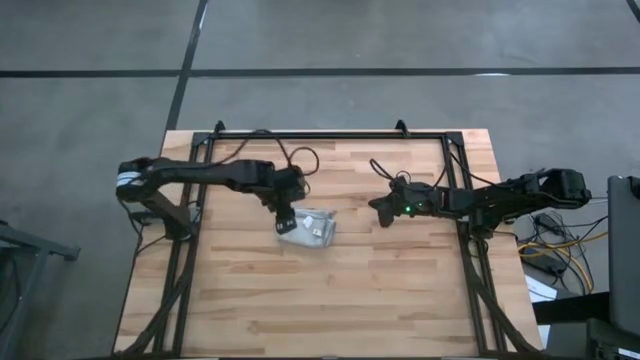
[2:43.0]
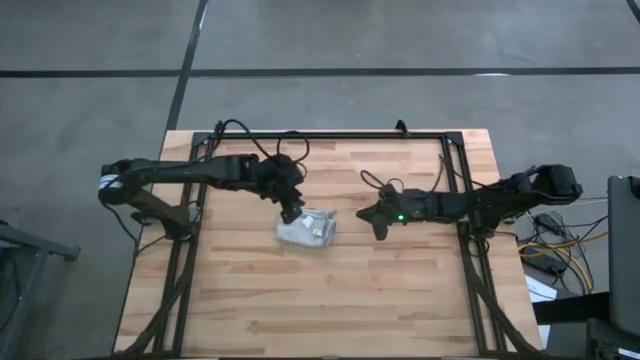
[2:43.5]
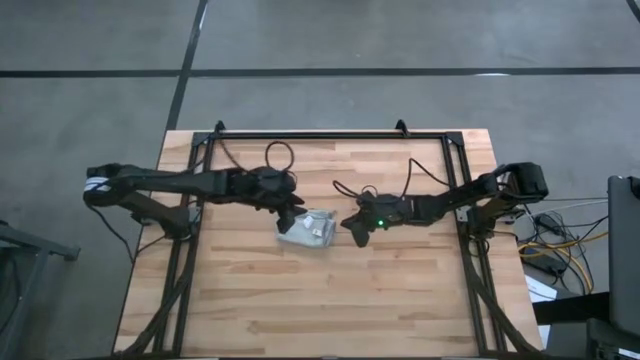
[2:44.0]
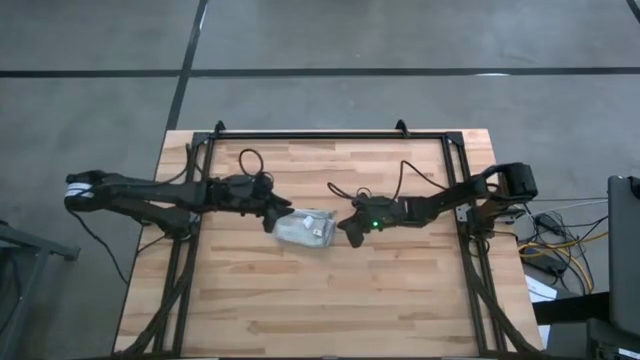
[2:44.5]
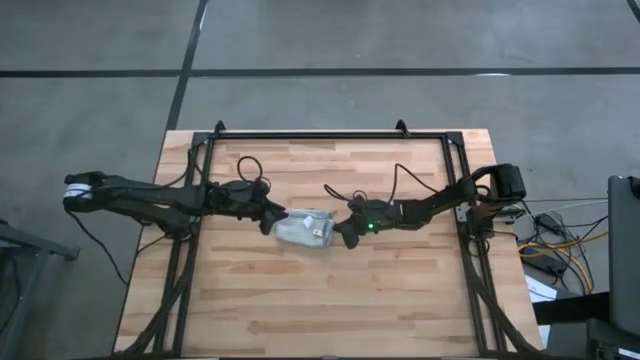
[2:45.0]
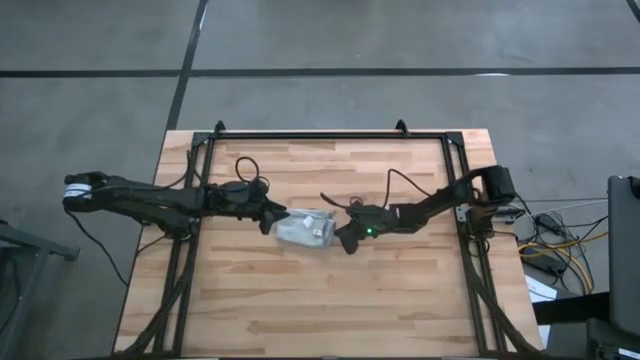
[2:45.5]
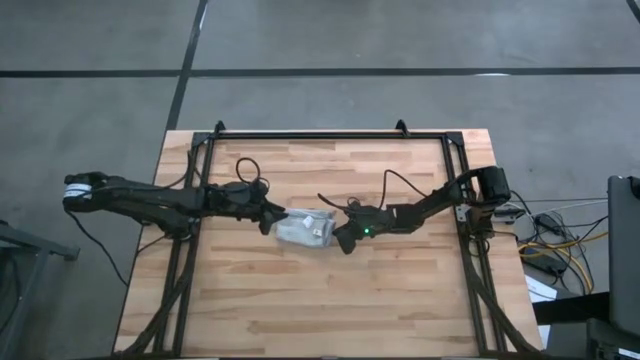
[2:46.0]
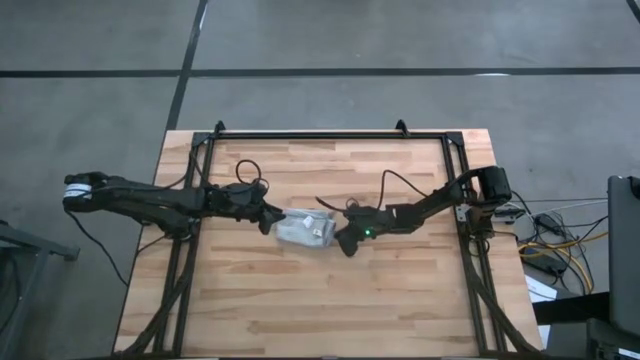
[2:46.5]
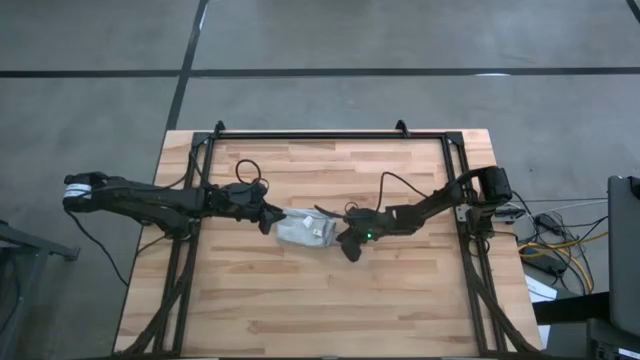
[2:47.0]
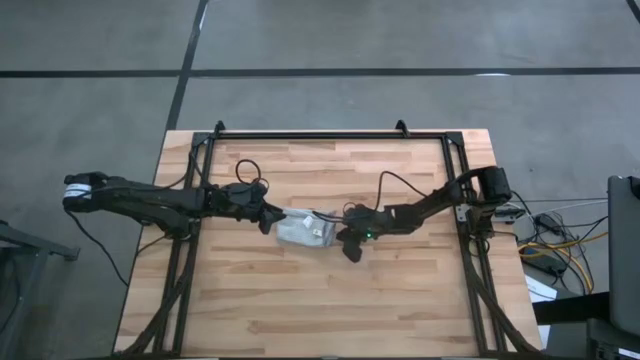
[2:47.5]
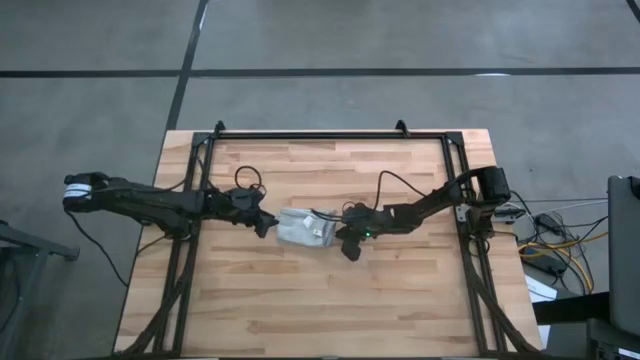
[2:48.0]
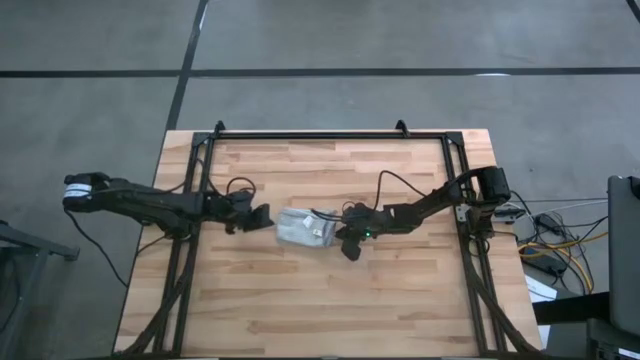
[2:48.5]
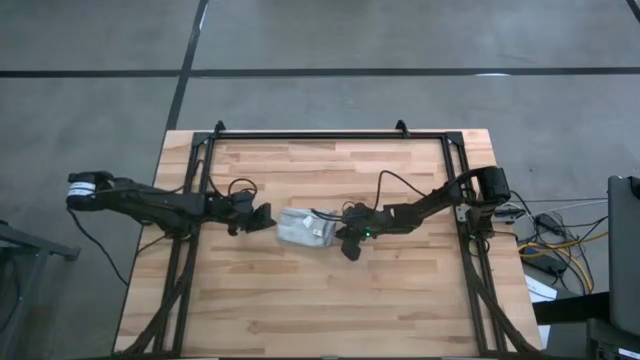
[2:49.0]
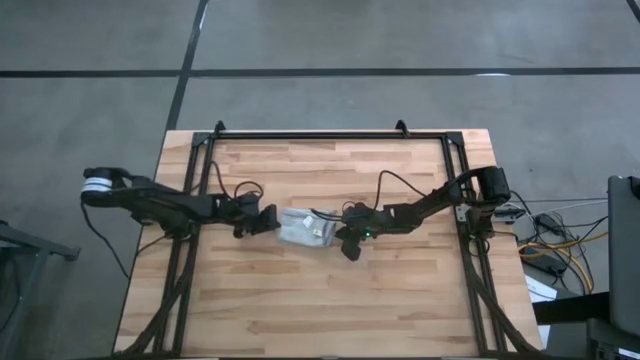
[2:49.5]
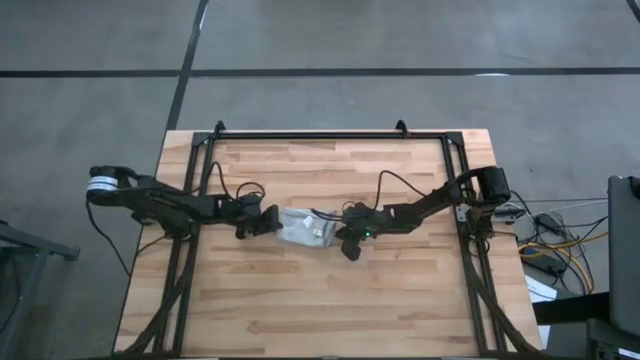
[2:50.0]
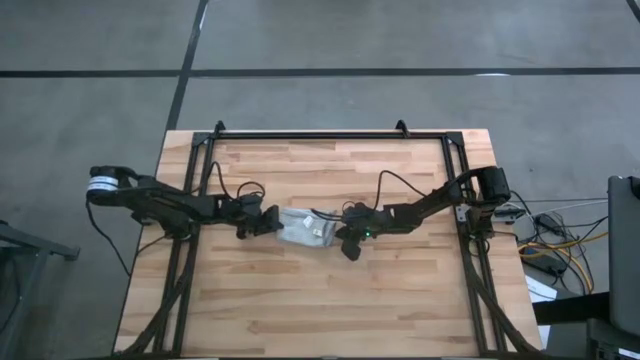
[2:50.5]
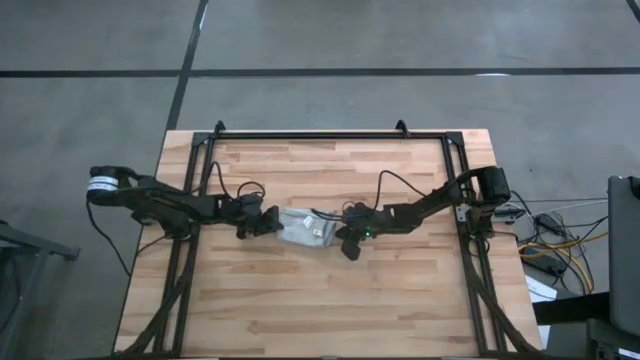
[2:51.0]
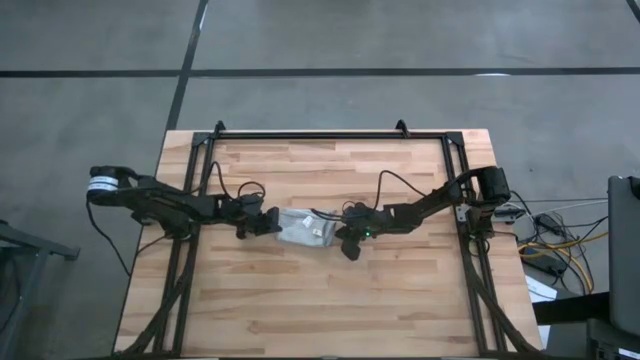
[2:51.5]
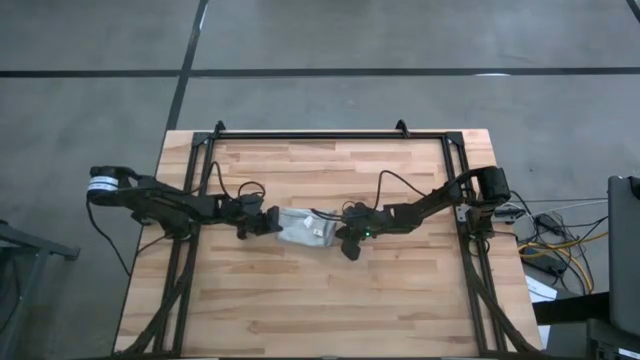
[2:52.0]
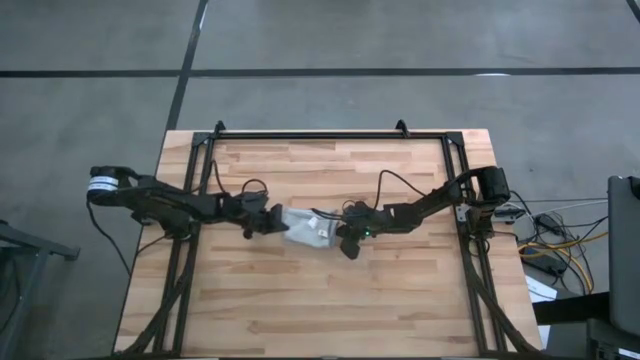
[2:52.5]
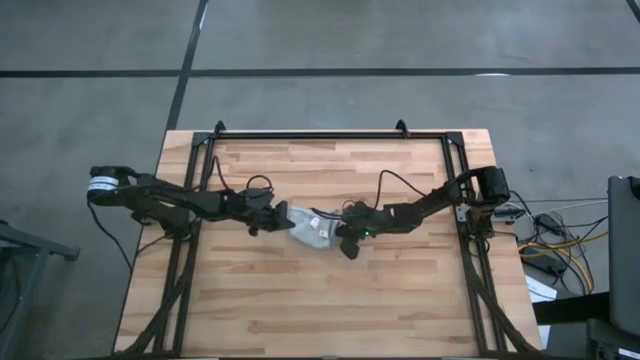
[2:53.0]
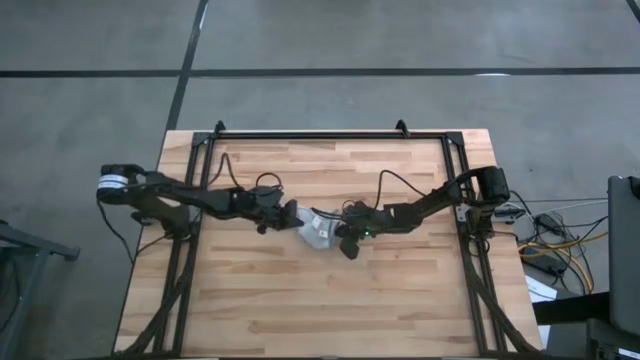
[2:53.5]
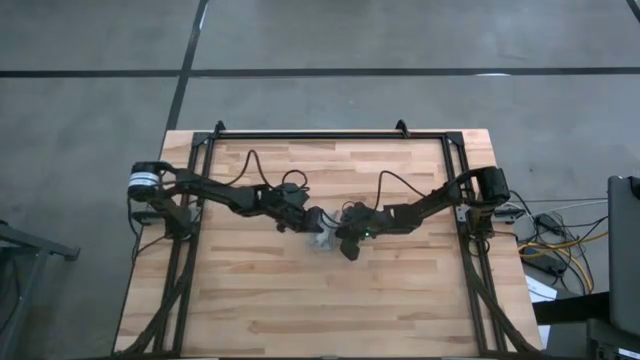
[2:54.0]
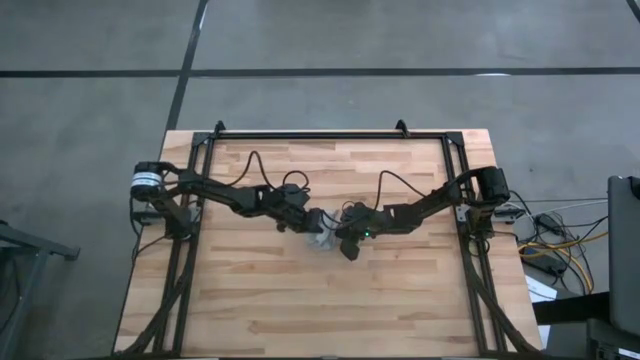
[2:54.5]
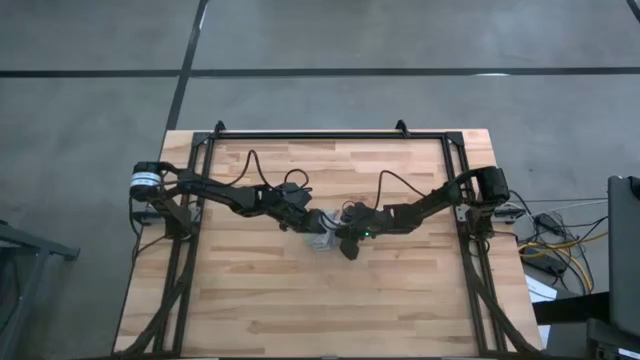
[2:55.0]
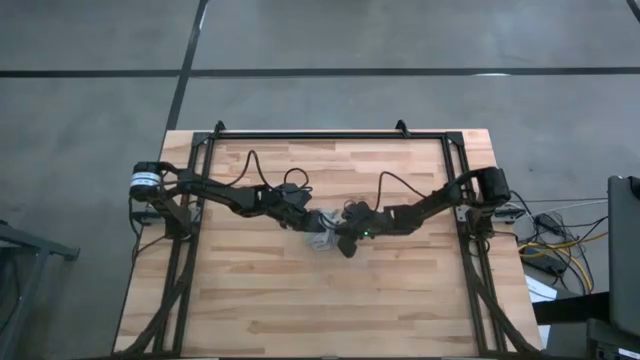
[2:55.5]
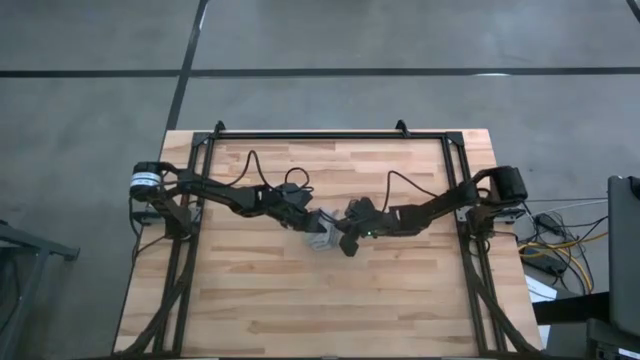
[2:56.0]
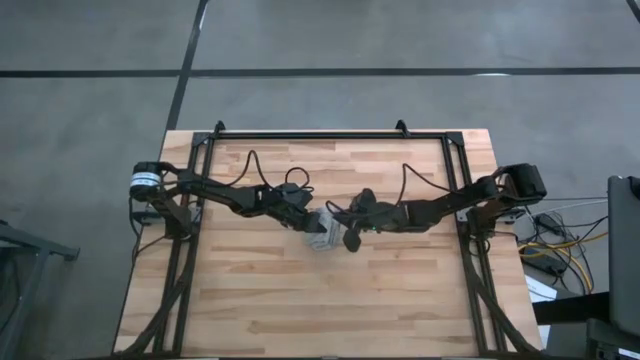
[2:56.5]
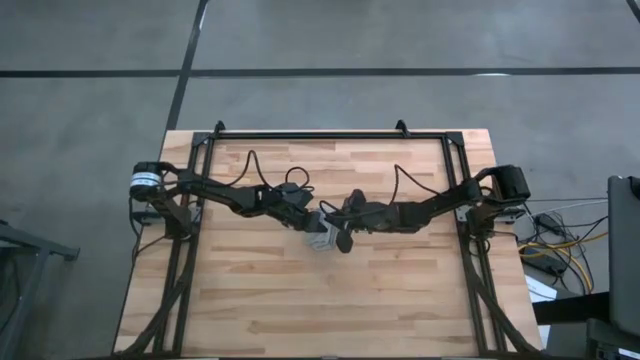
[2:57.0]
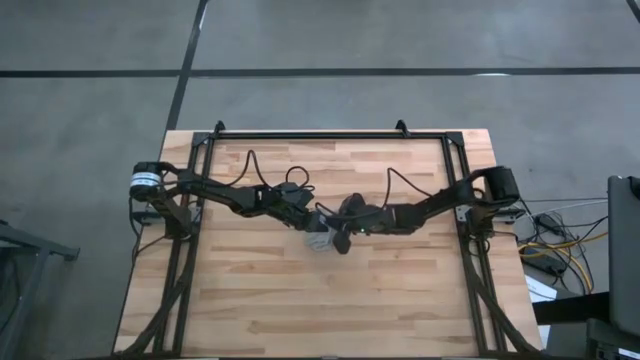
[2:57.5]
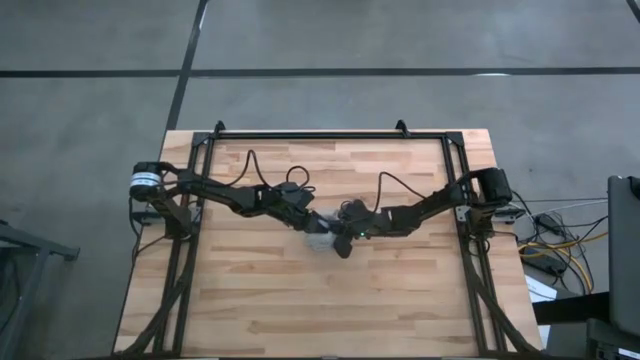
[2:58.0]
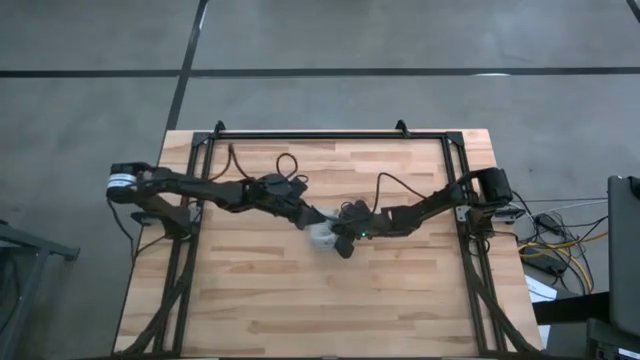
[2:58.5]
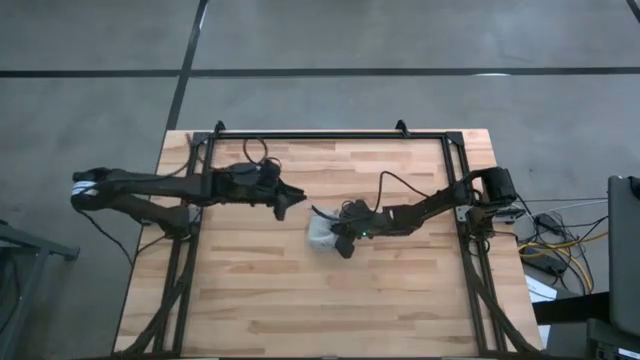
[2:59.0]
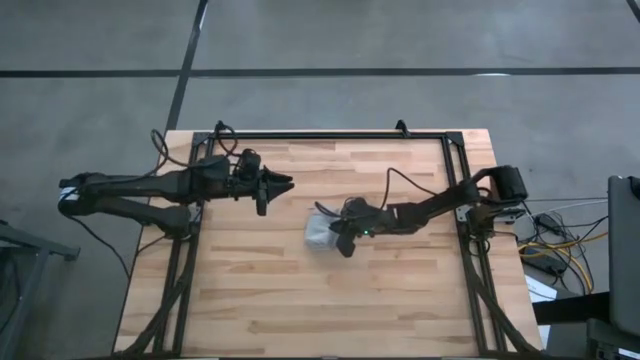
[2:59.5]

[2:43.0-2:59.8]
Task: Roll towel
Roll the gray towel

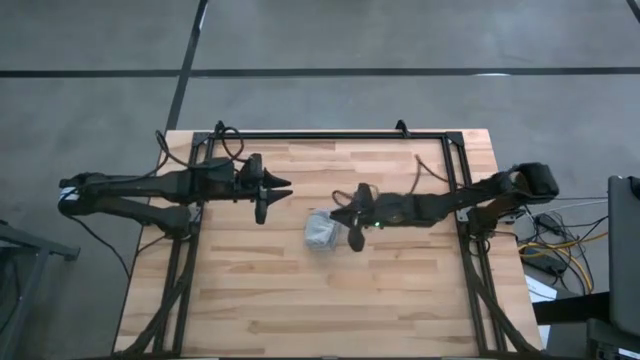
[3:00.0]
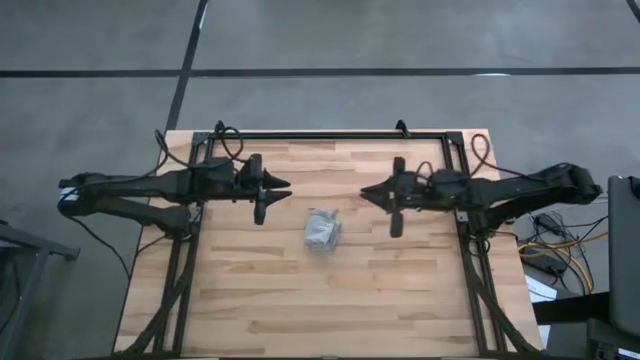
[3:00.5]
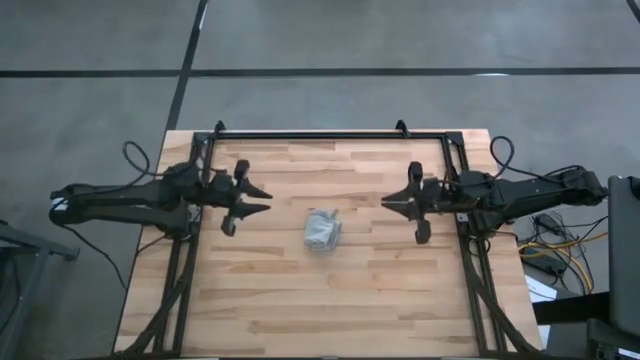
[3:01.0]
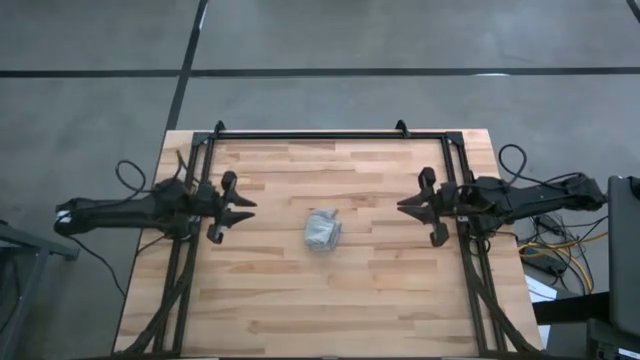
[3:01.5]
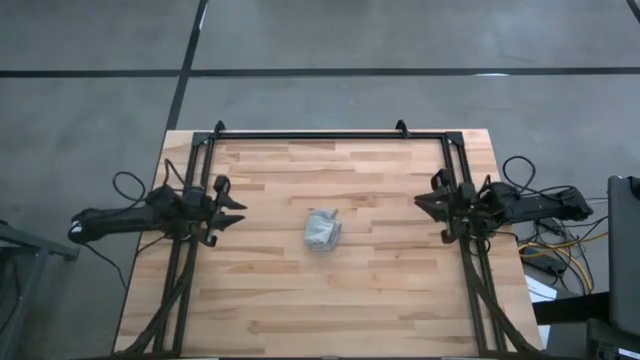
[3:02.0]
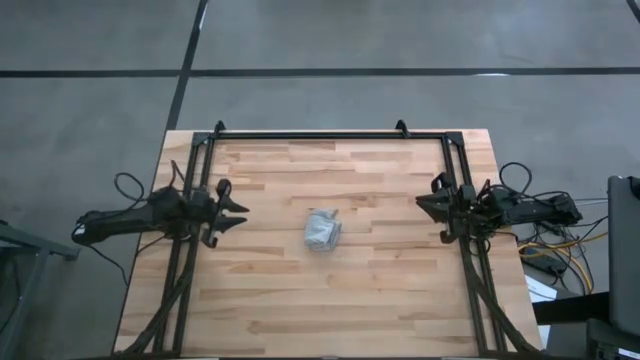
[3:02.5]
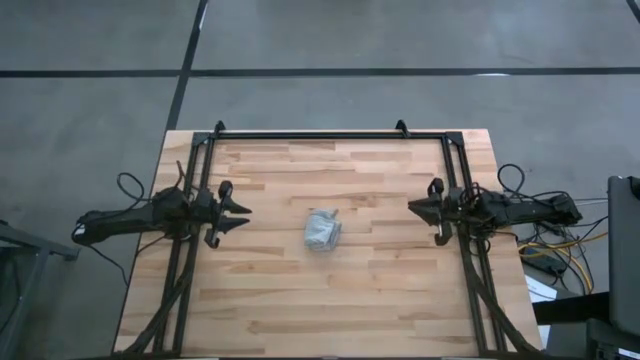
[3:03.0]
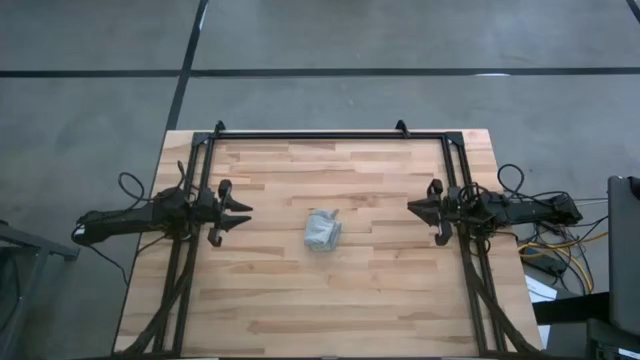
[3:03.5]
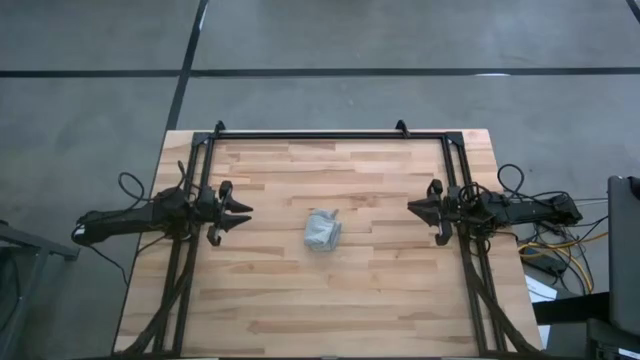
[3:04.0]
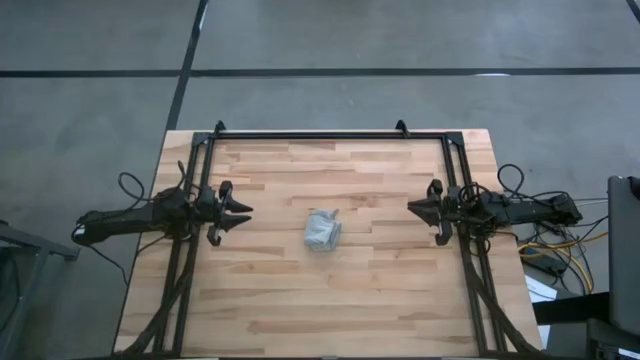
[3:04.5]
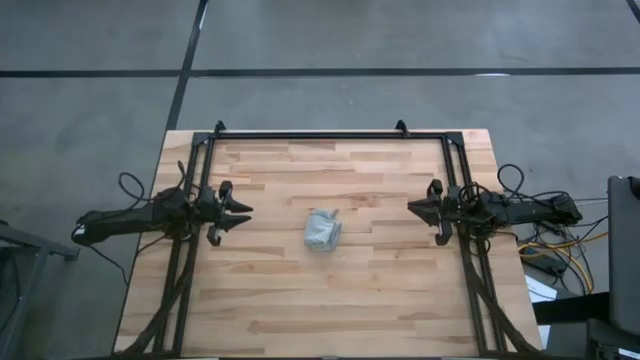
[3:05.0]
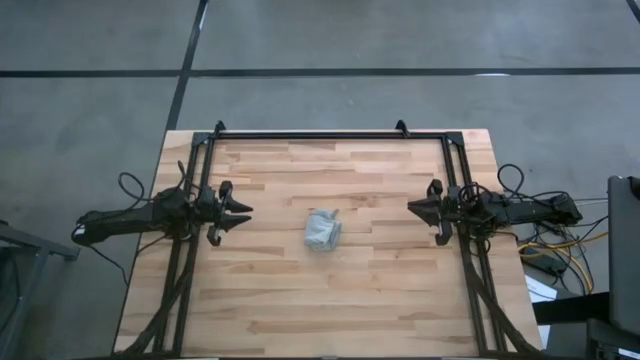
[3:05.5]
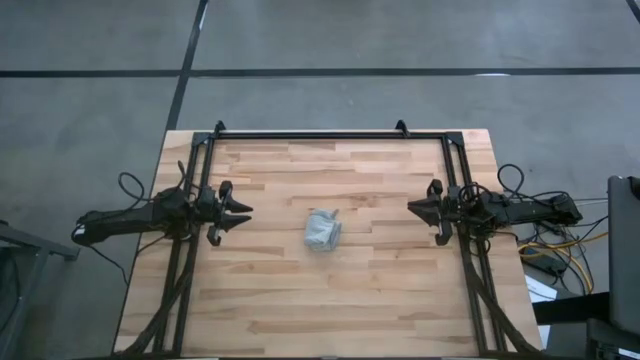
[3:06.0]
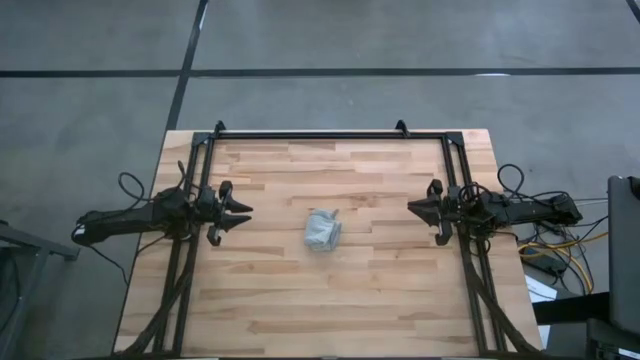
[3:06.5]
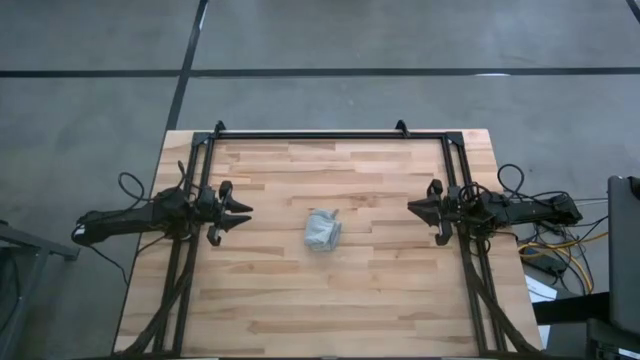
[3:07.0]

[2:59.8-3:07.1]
Return to Home Position
